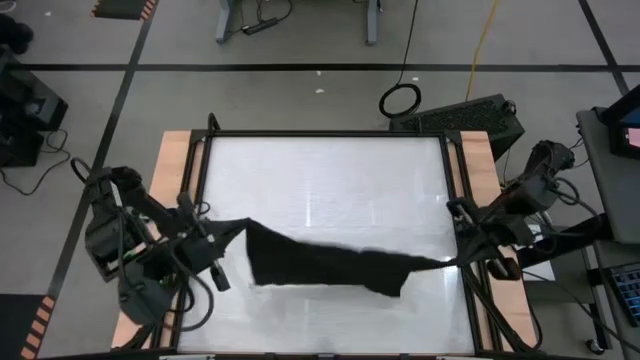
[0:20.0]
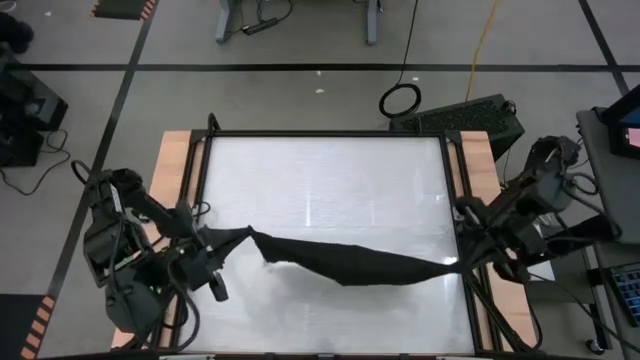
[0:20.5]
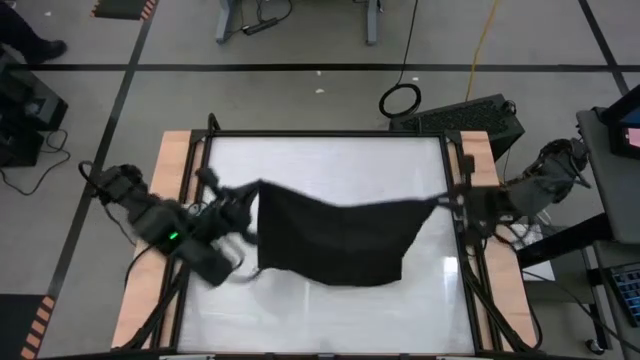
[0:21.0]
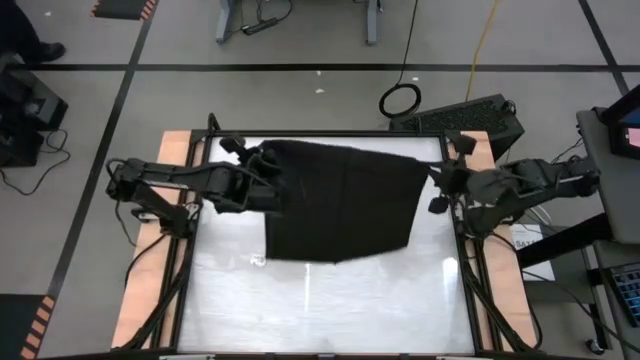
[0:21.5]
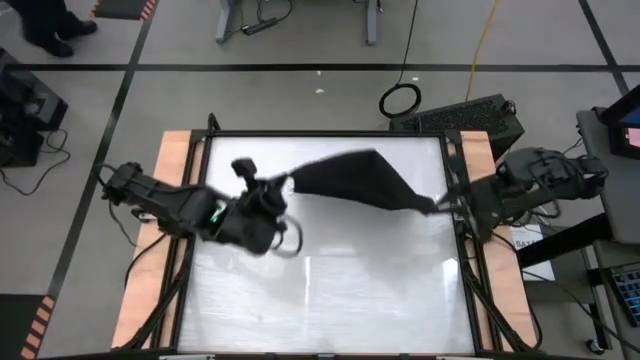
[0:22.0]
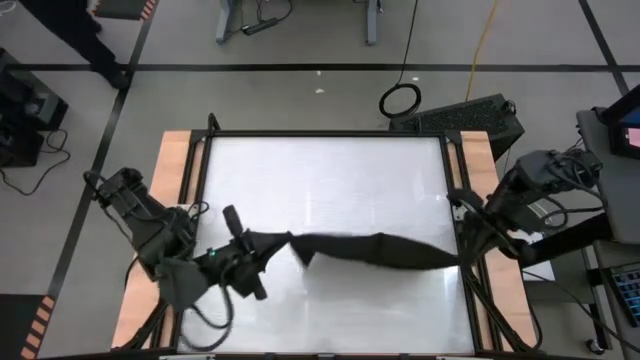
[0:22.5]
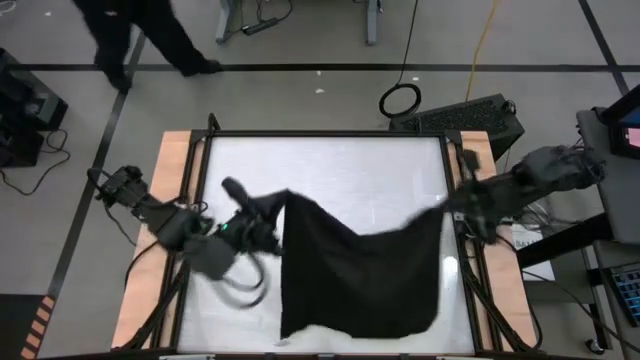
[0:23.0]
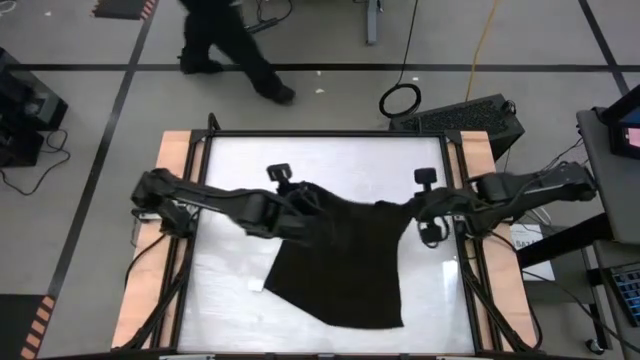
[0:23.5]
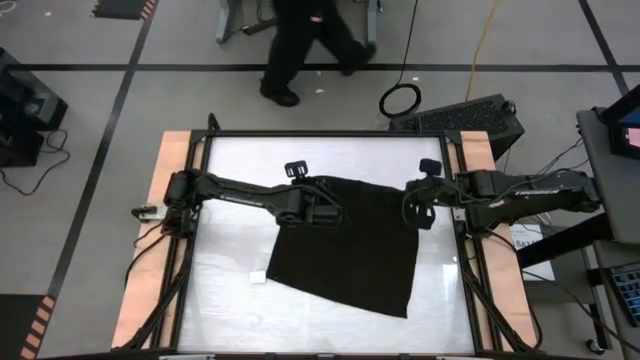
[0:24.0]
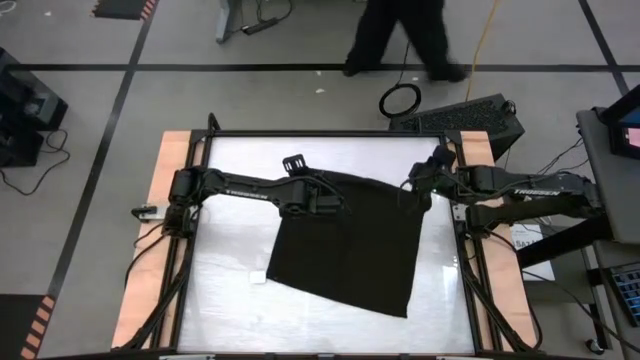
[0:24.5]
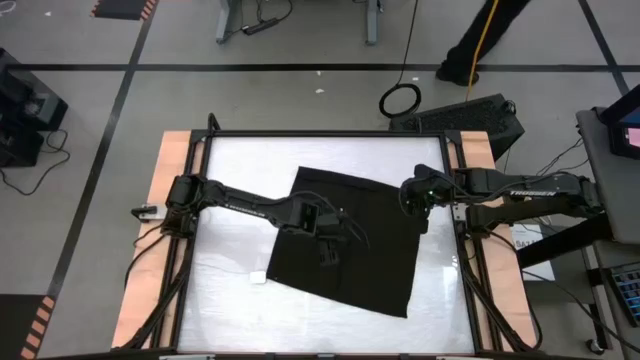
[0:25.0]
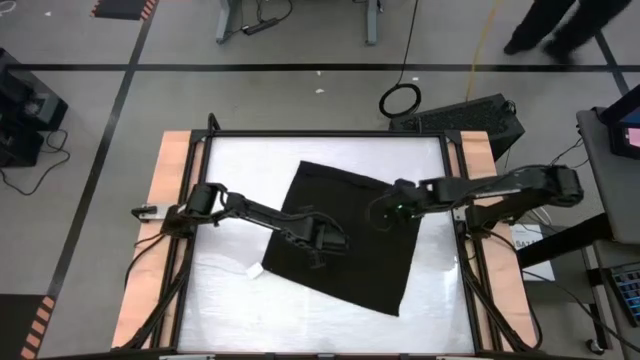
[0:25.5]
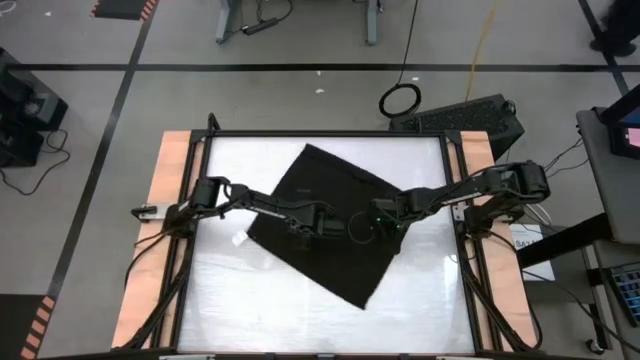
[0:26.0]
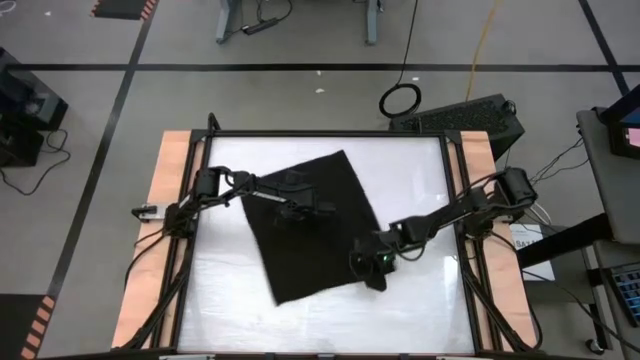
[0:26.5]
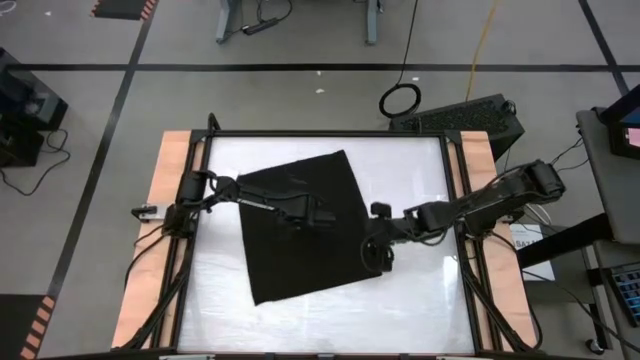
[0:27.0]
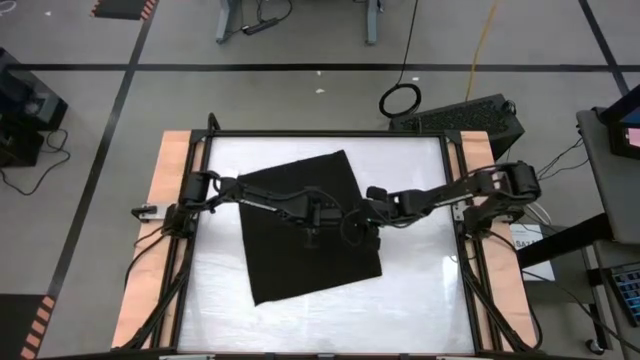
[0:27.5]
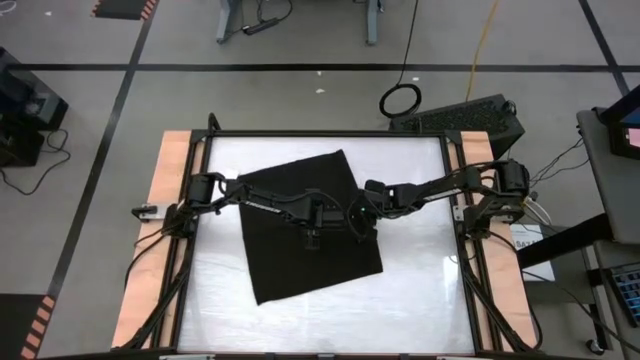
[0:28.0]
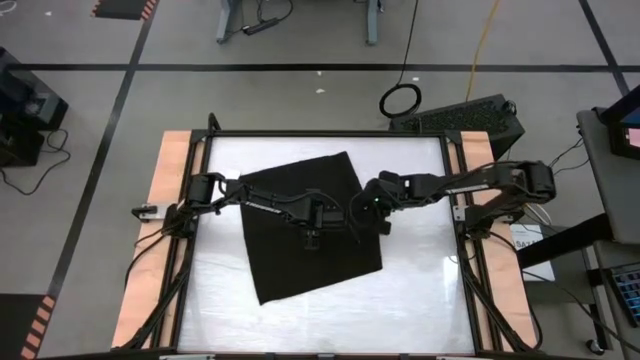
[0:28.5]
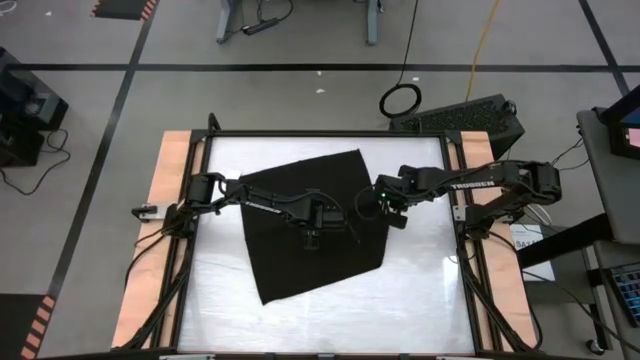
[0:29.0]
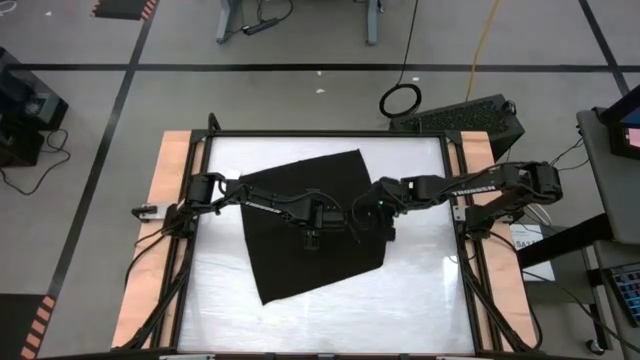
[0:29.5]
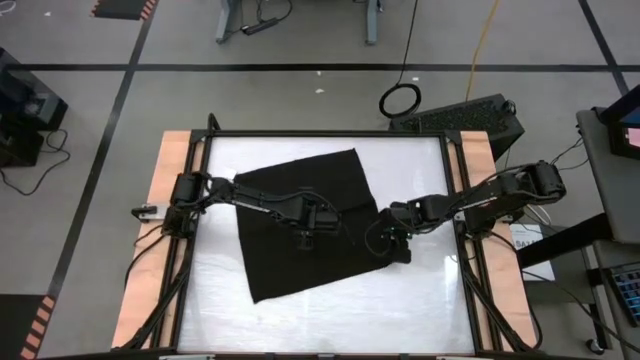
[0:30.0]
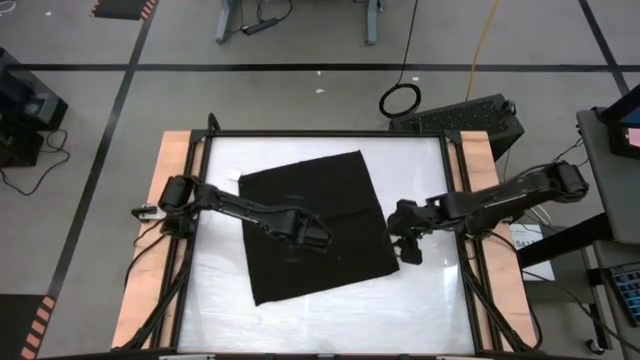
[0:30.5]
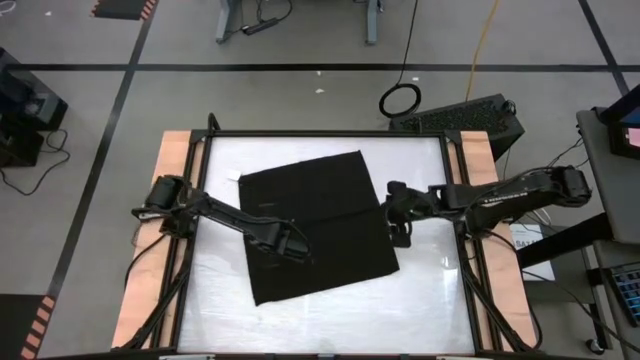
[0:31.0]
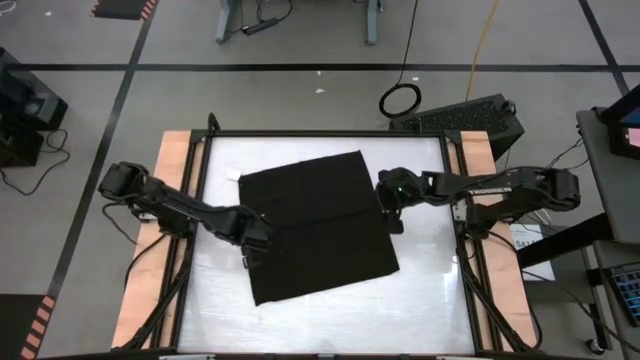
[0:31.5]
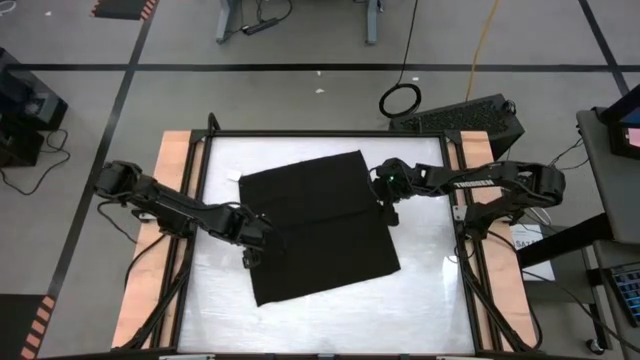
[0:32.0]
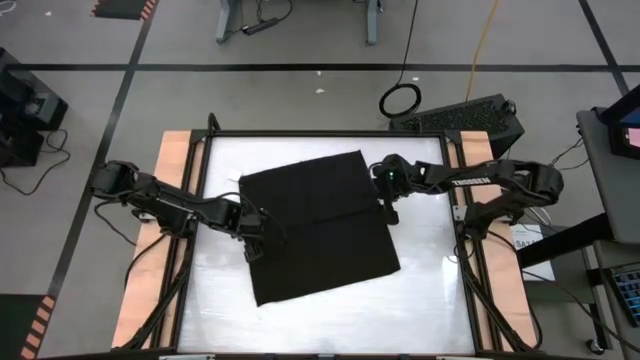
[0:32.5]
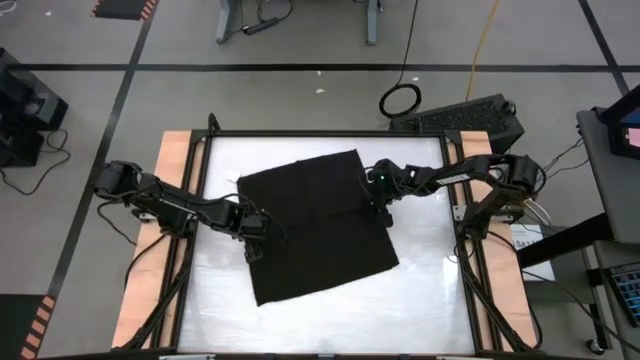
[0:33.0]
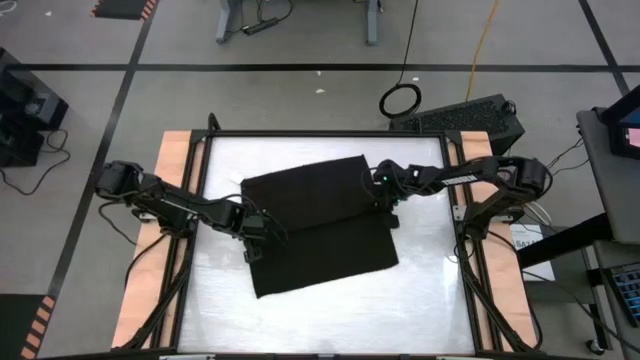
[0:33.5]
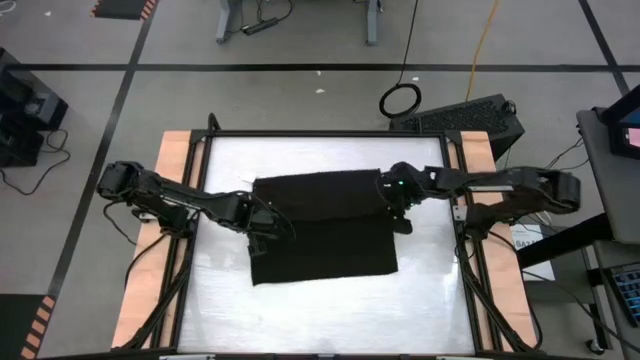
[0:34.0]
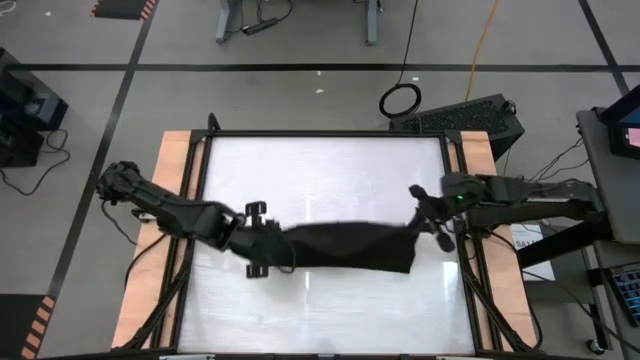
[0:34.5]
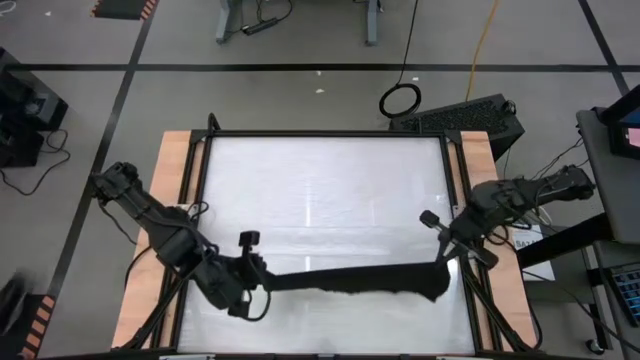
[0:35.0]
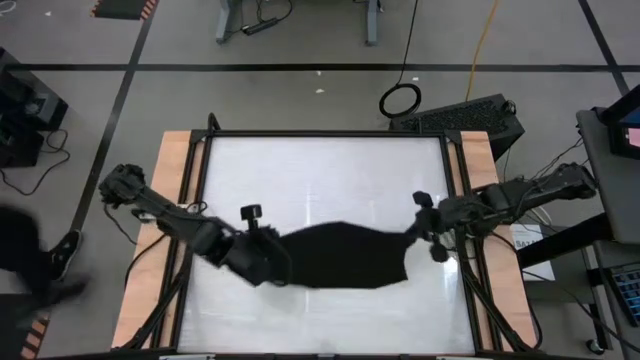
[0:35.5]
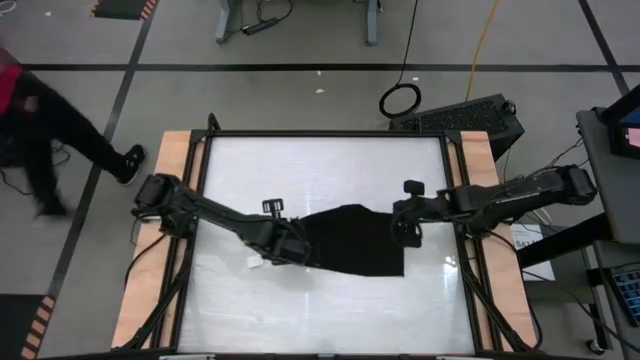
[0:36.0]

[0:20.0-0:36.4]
Task: Roll towel into tight, uniform cylinder
Roll the black towel

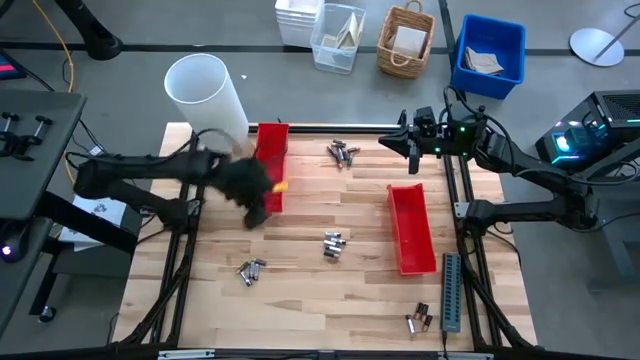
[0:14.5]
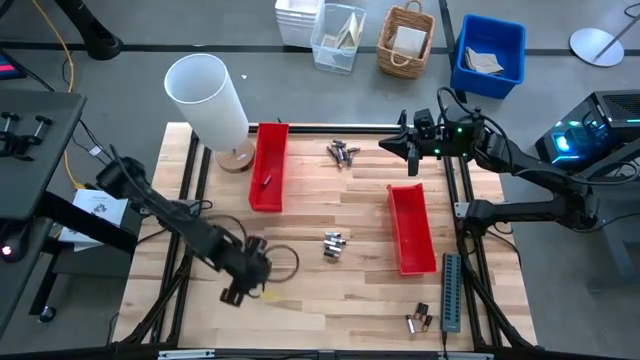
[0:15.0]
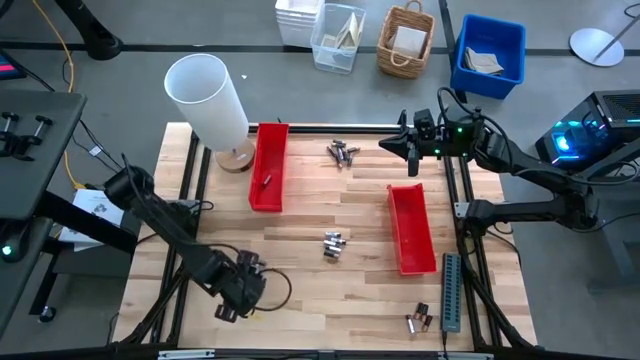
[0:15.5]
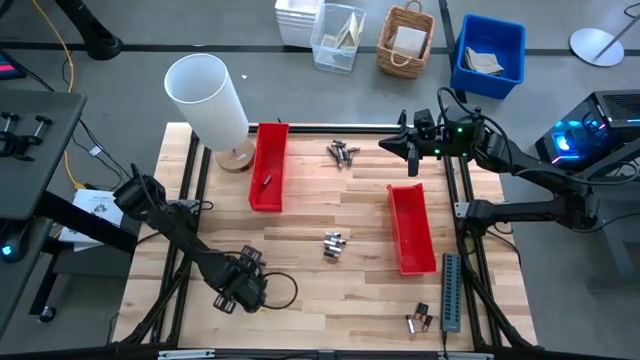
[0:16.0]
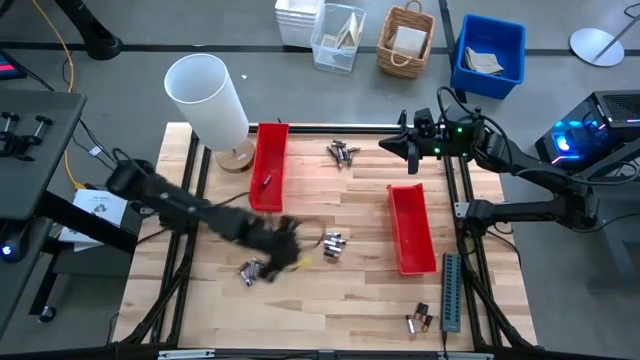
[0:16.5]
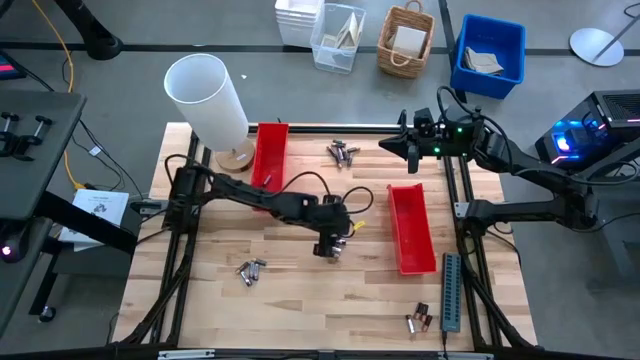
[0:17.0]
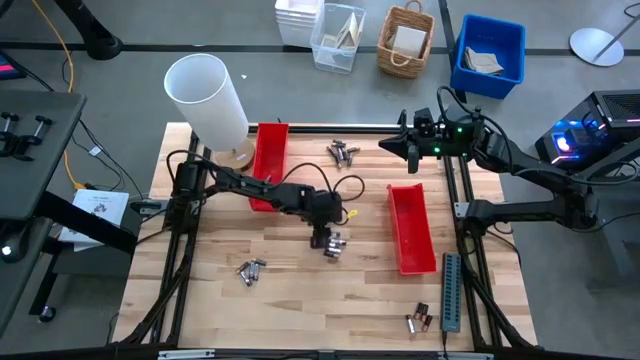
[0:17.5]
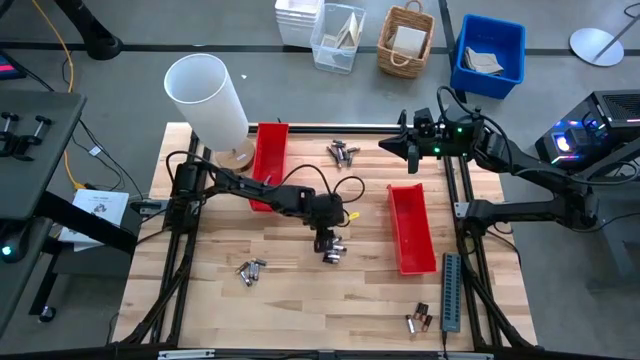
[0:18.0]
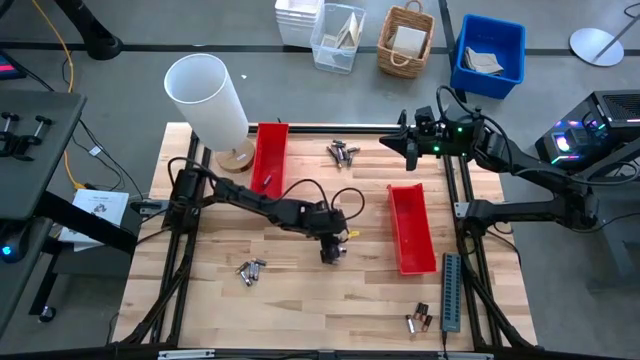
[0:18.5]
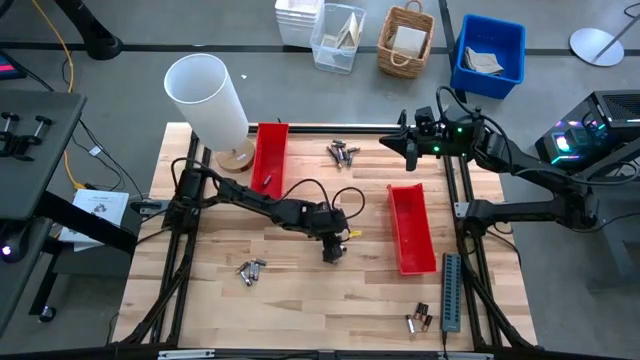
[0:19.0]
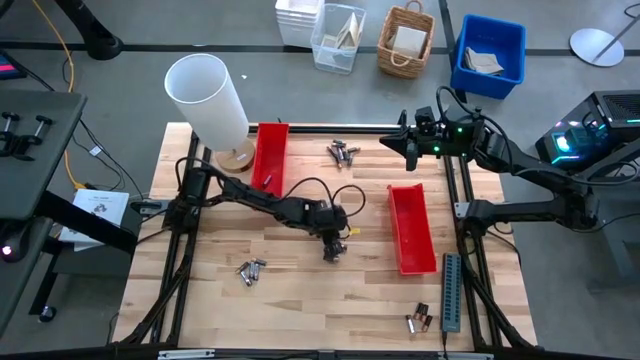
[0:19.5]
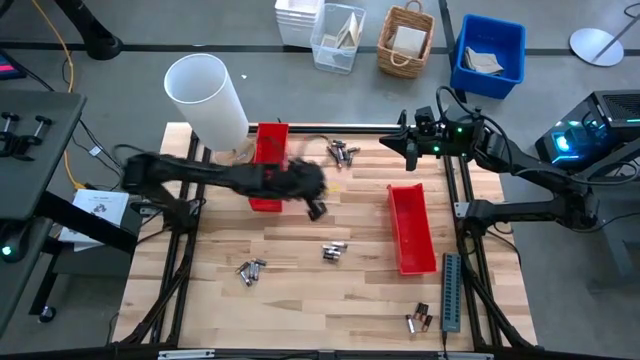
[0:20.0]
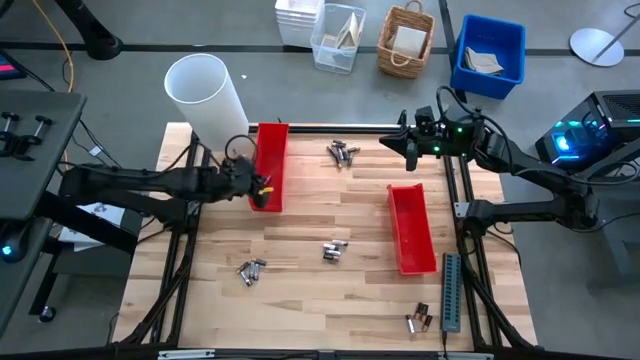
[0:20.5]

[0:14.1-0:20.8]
Task: Sort batteries
Put the silver battery into the top red bin
